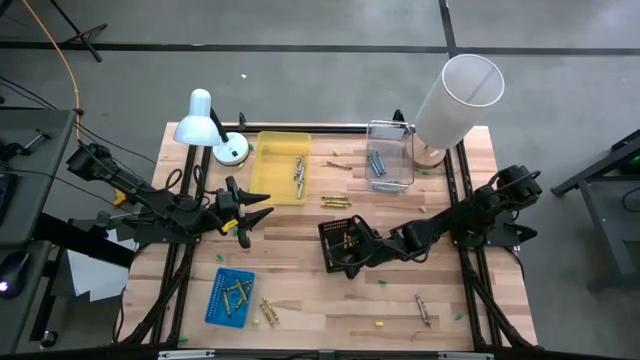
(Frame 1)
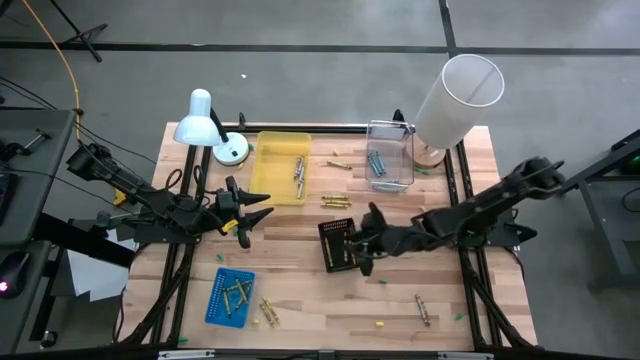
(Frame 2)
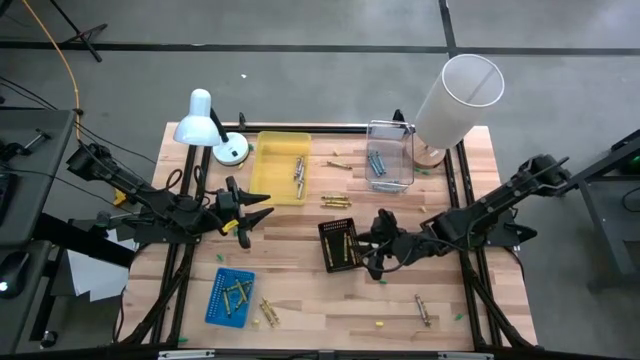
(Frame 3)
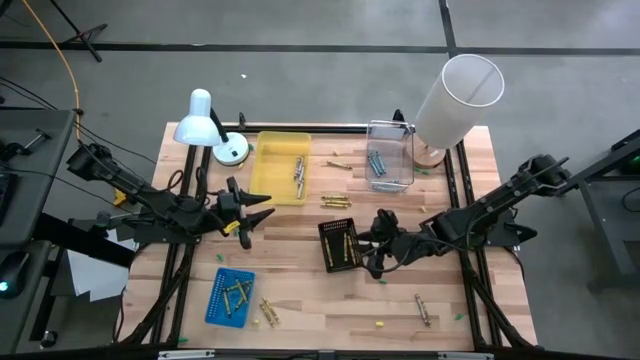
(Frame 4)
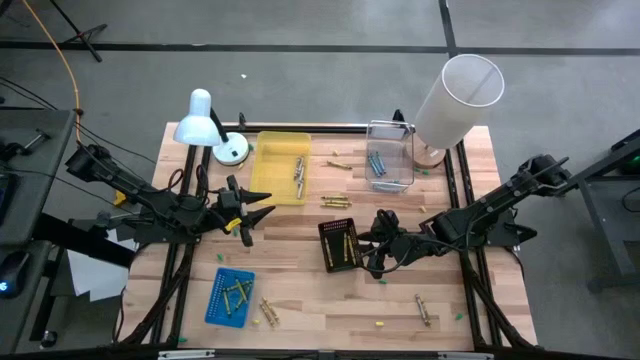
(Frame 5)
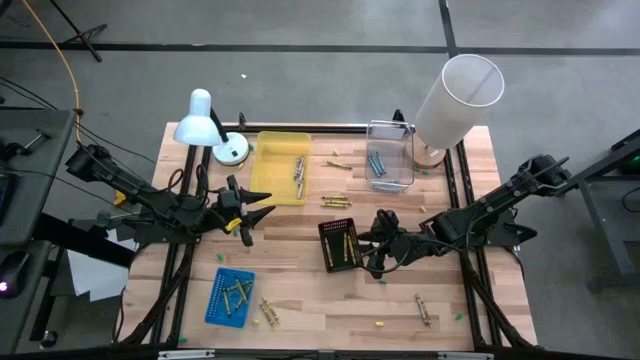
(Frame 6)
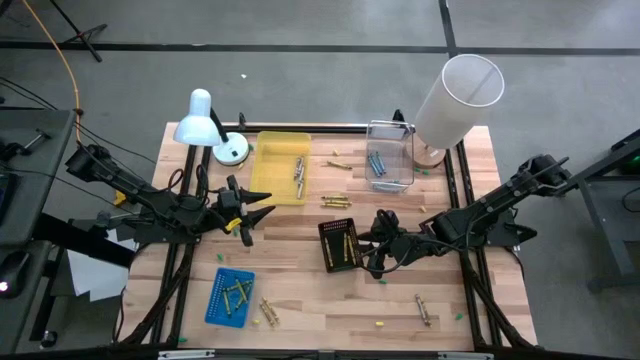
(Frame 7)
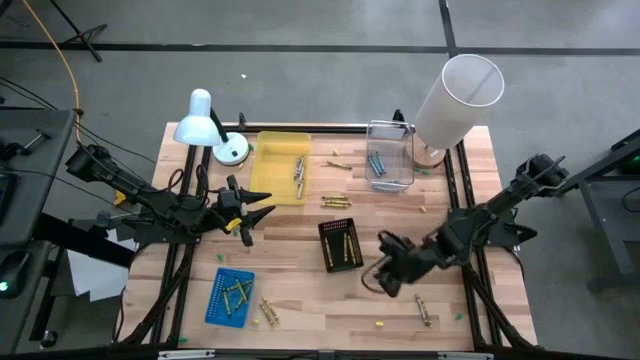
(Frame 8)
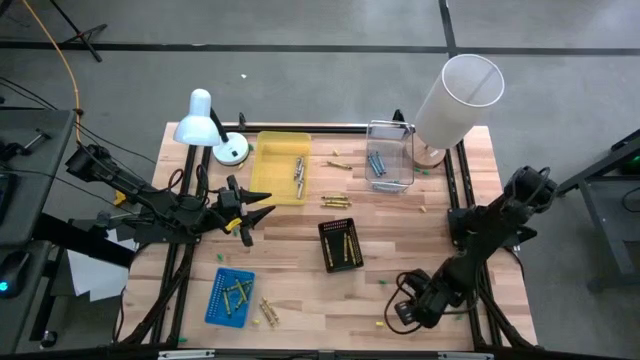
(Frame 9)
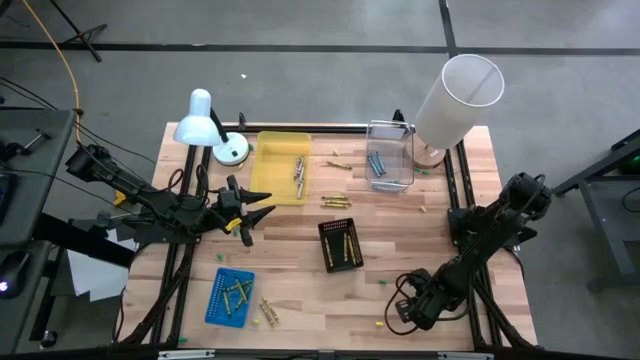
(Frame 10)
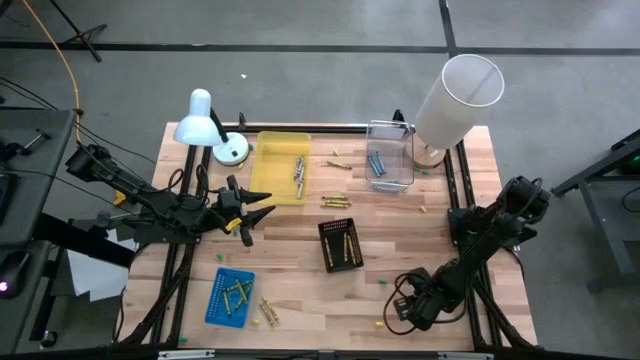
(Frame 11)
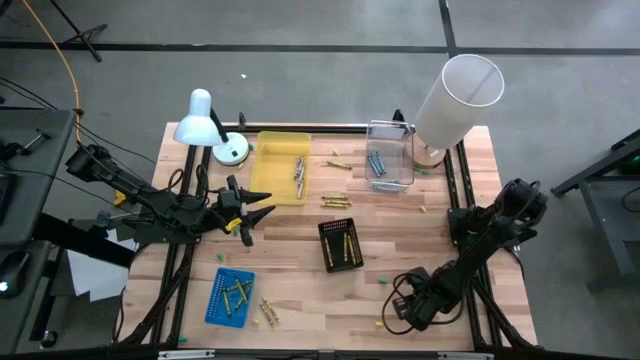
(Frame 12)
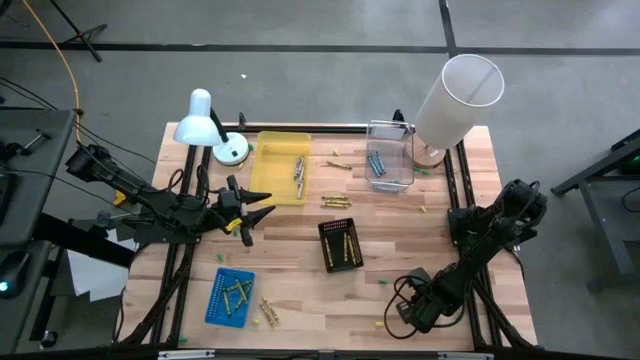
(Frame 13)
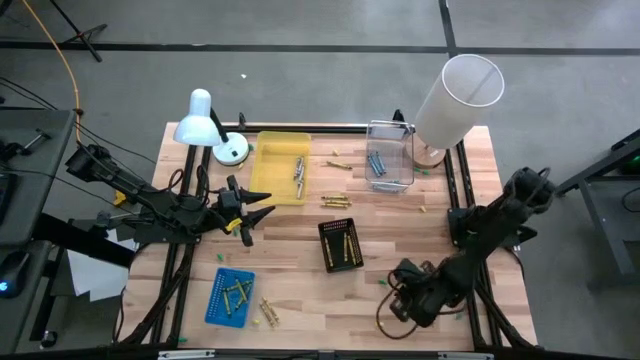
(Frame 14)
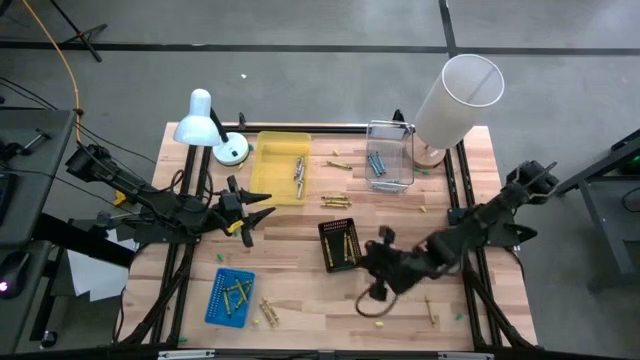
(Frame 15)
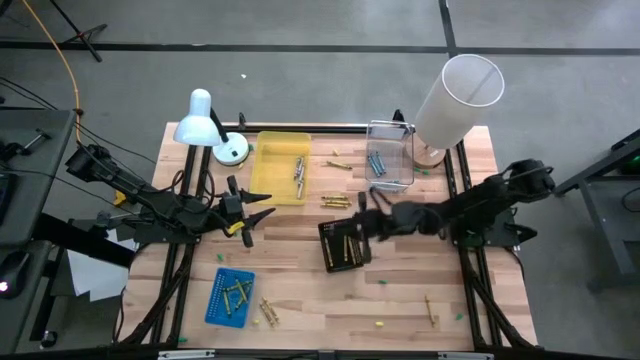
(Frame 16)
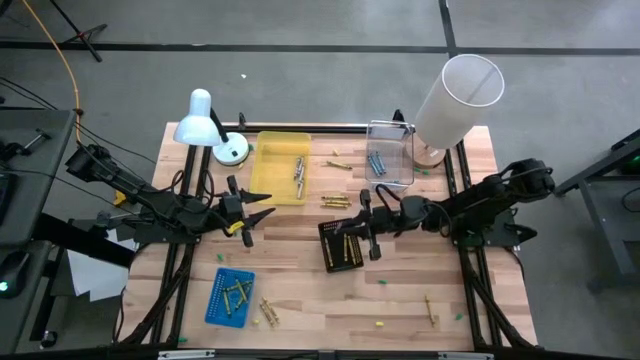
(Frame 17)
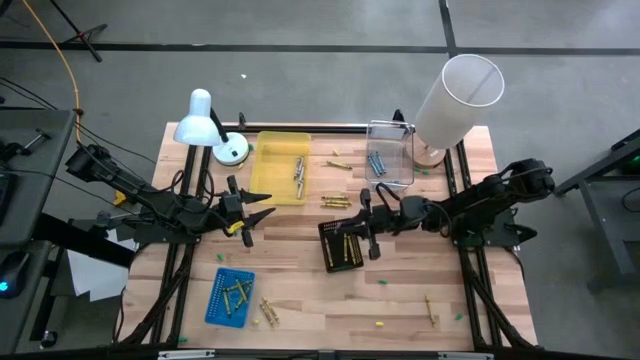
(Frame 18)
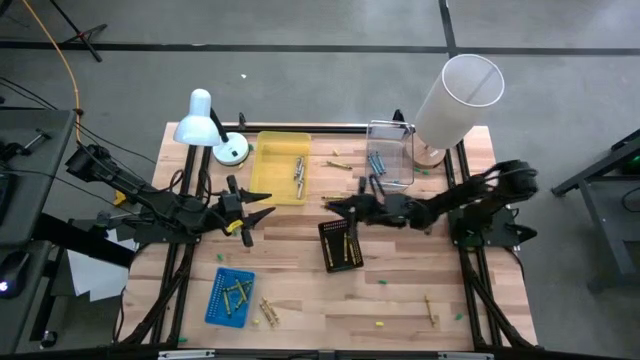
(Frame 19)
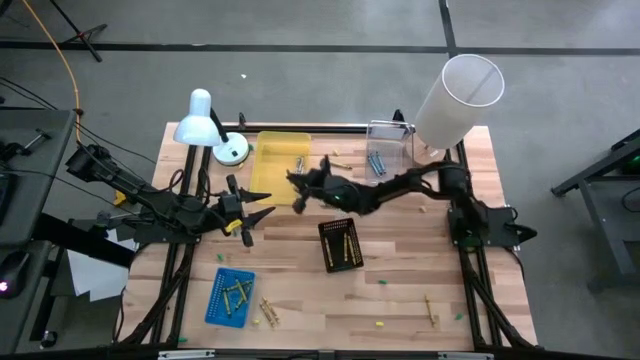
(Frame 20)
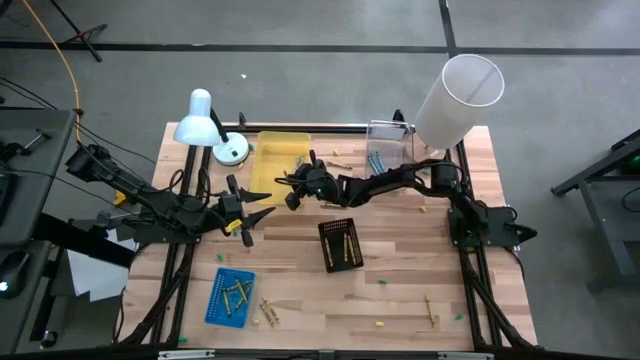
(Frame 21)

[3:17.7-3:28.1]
Task: Sort crayons
Put the gray crayon into the yellow transparent bin

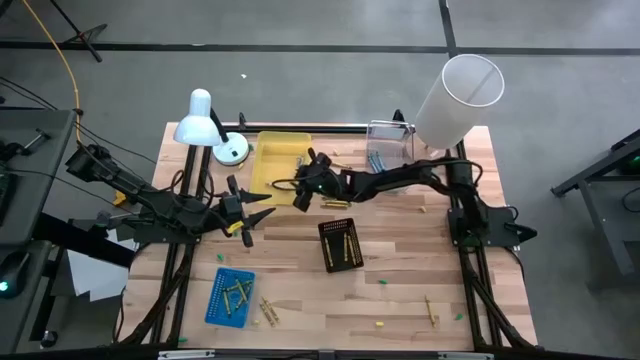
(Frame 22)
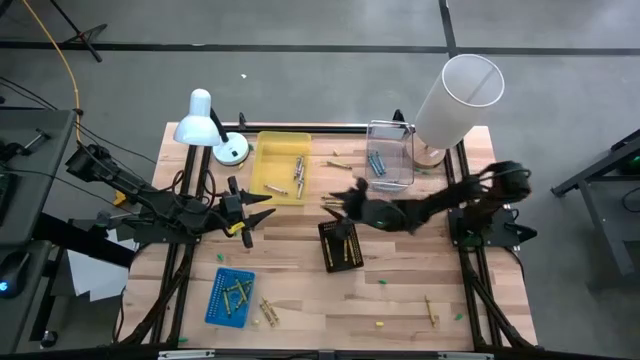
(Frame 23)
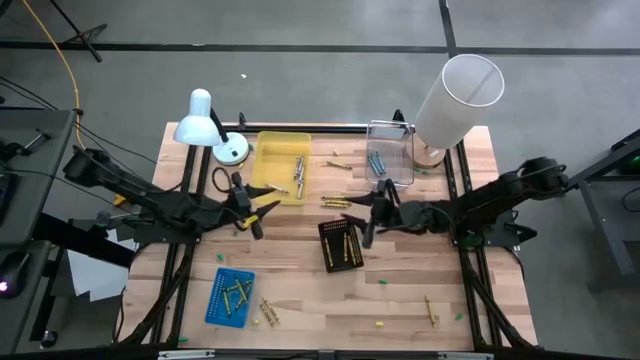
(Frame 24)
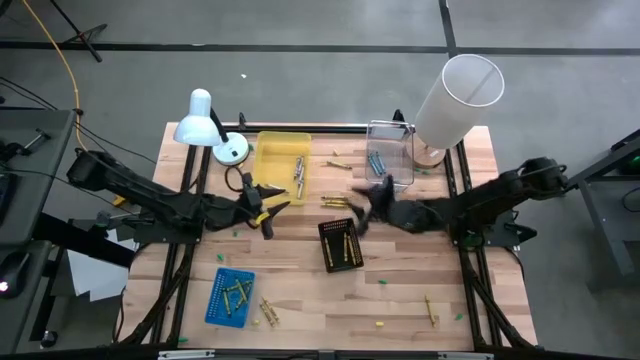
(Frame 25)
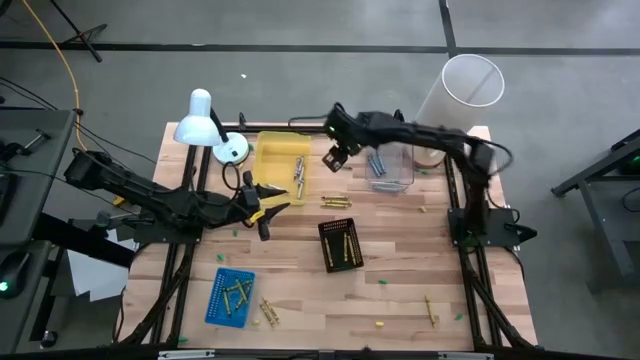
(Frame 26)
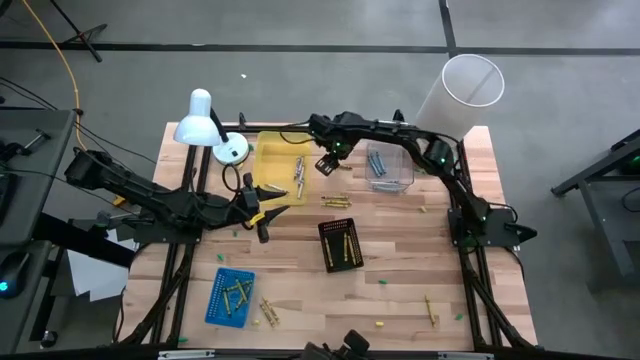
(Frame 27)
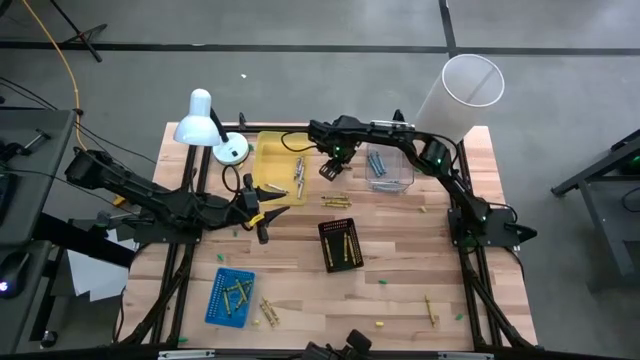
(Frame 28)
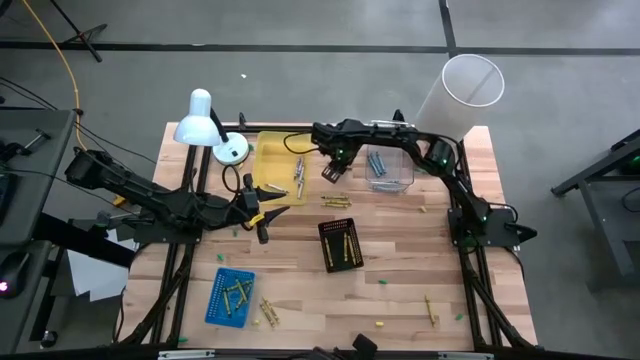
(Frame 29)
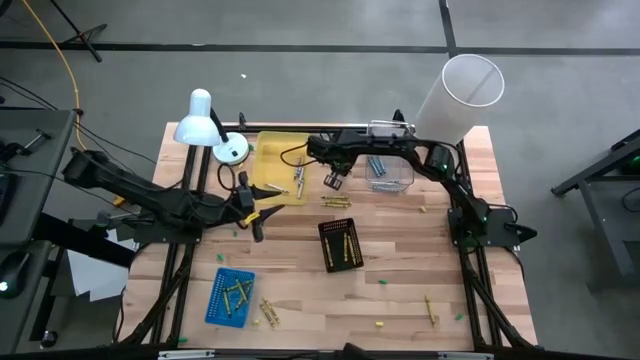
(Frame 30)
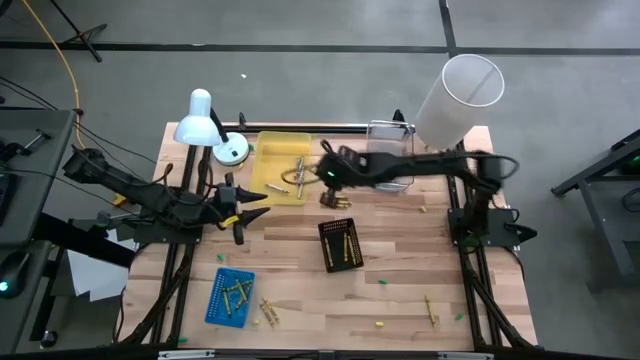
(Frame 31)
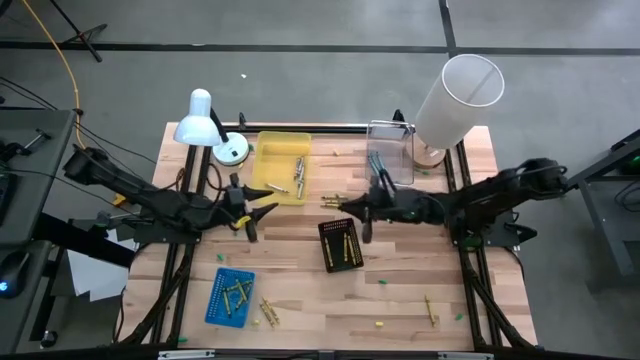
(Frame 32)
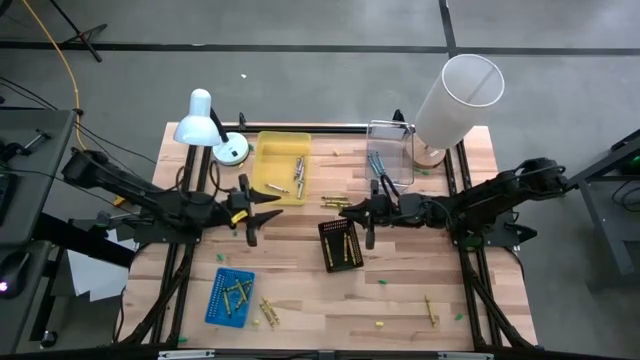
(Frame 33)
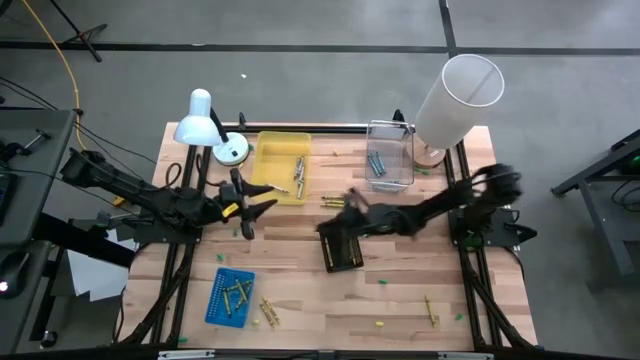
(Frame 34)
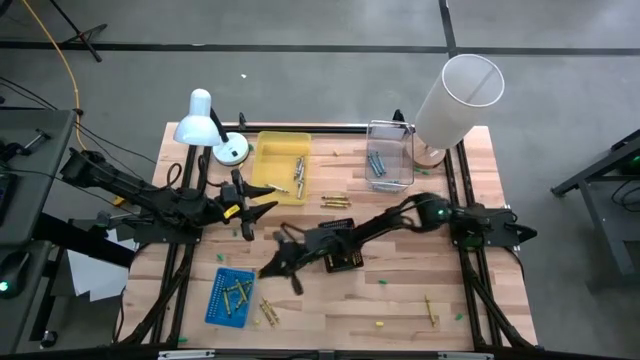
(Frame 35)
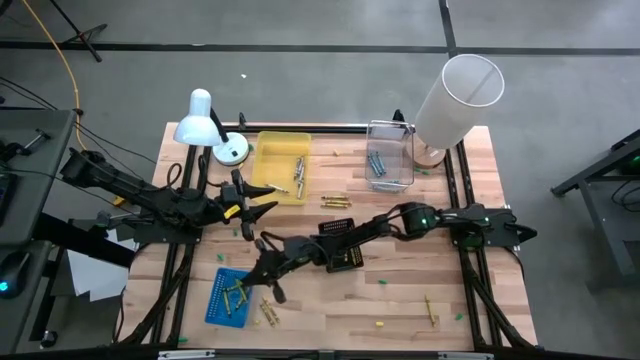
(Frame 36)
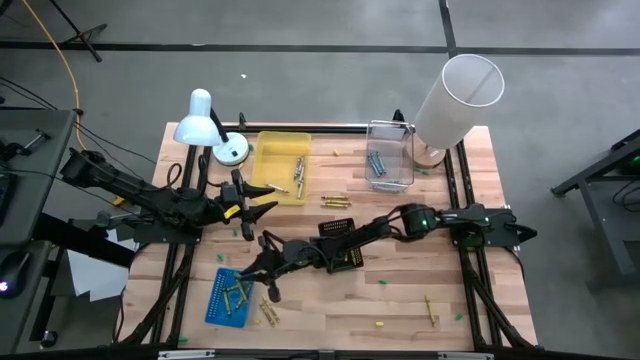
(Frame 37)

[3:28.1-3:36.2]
Put the green crayon into the blue bin

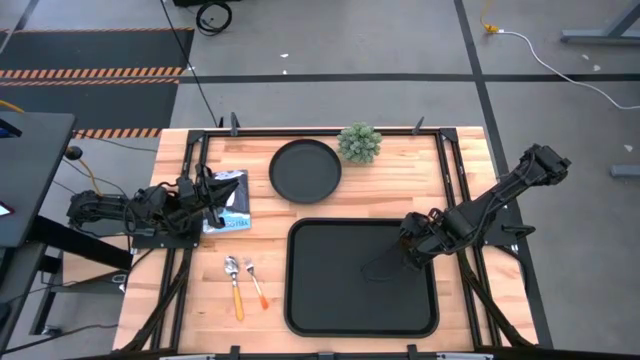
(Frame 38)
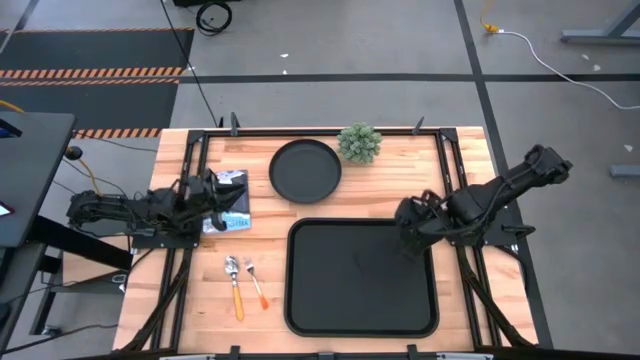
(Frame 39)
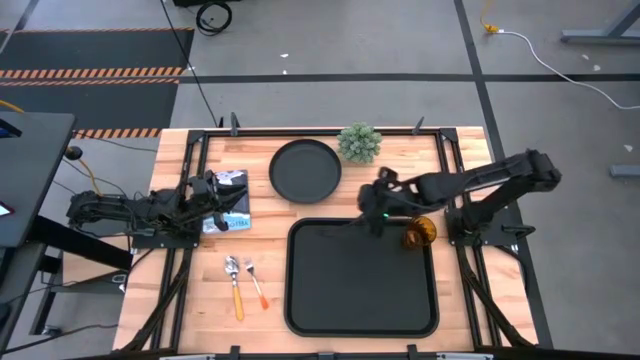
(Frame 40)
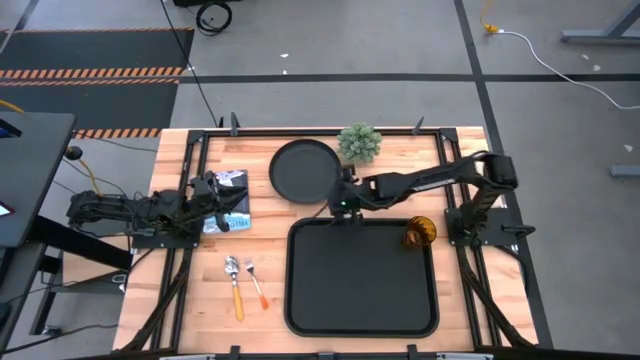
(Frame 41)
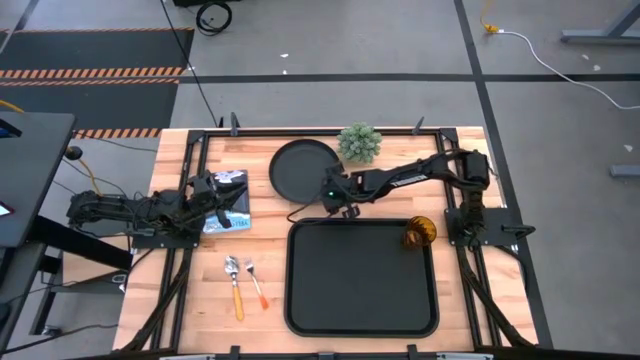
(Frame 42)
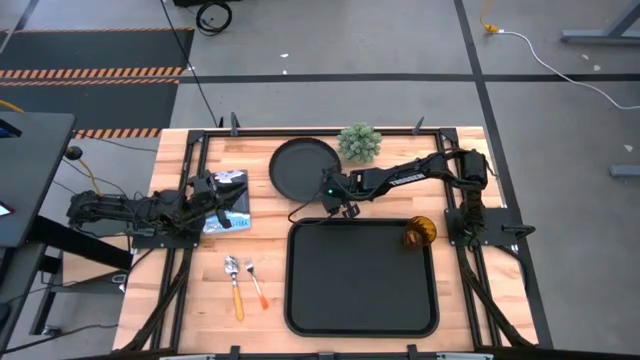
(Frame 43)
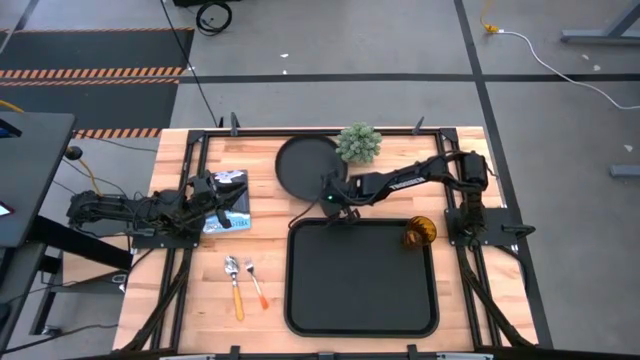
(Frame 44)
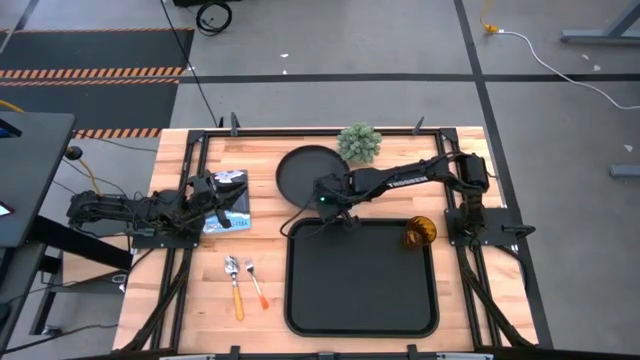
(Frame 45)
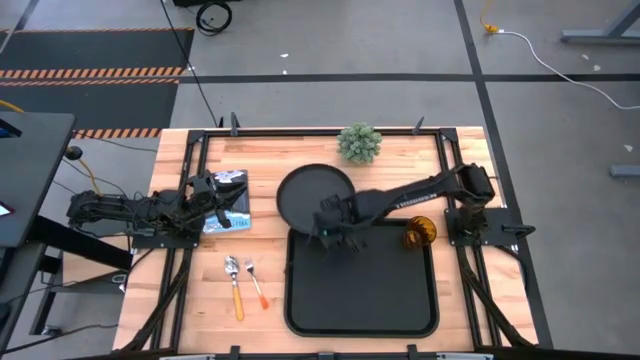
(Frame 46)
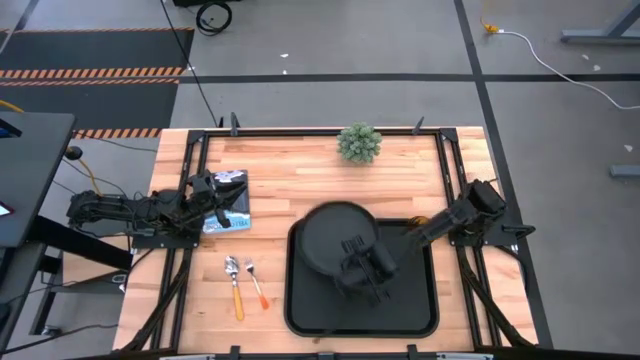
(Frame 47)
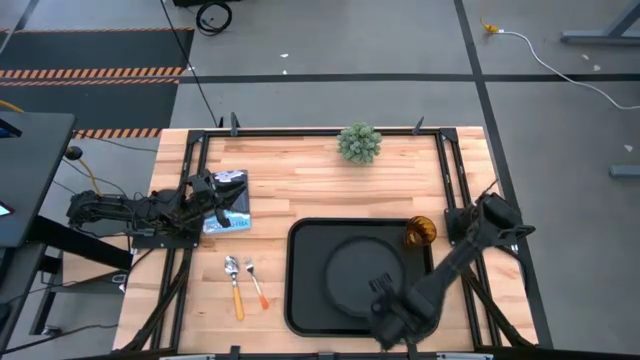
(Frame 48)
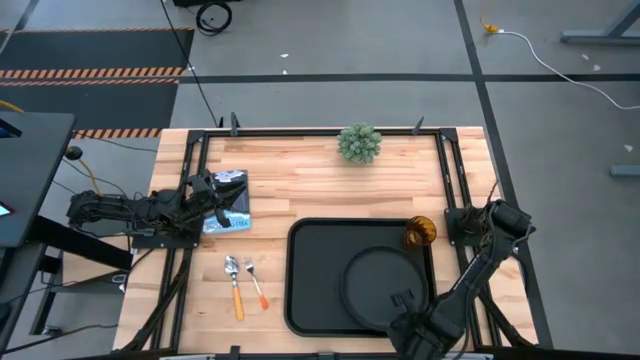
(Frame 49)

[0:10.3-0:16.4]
Task: Pick and place plate/cup/fork/spoon on tray
Put the black plate on the black tray to the bottom of the orange cup
